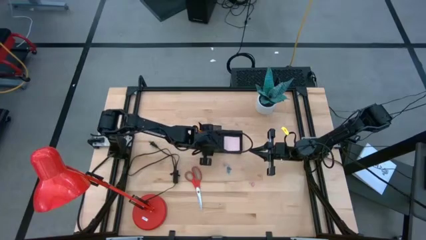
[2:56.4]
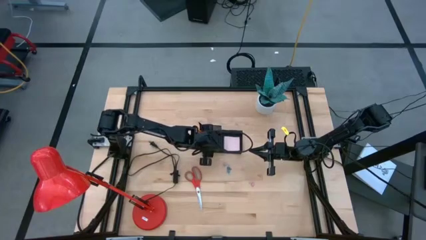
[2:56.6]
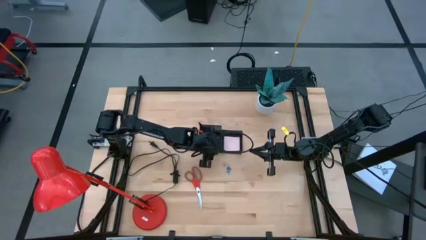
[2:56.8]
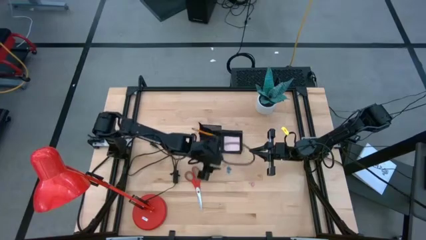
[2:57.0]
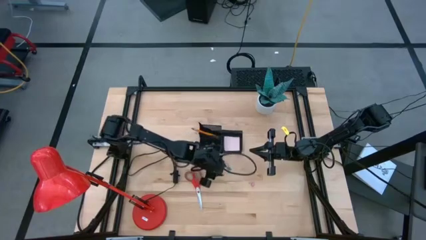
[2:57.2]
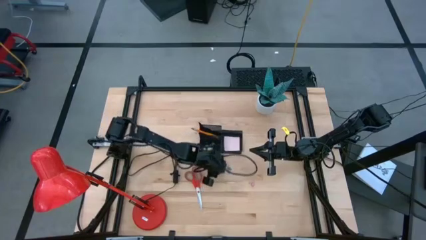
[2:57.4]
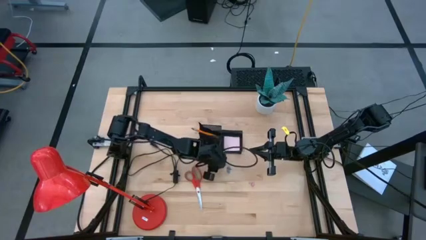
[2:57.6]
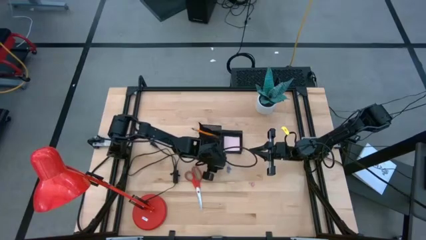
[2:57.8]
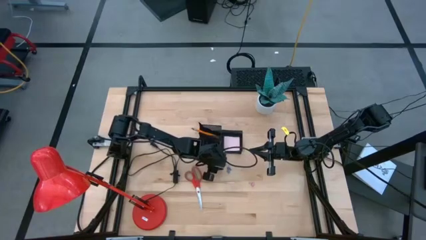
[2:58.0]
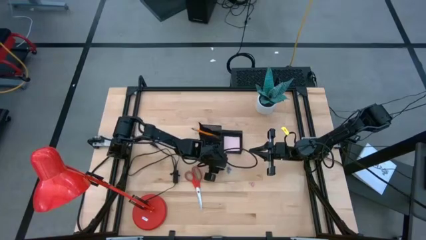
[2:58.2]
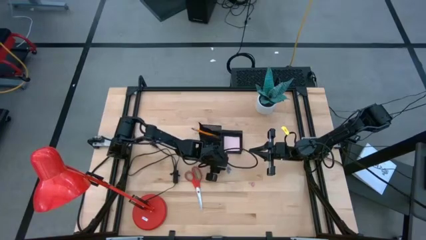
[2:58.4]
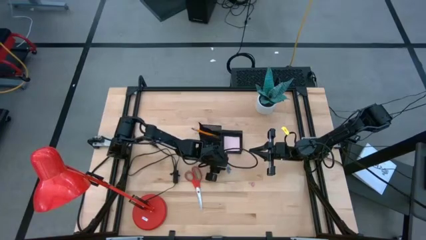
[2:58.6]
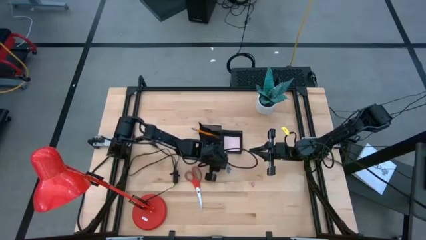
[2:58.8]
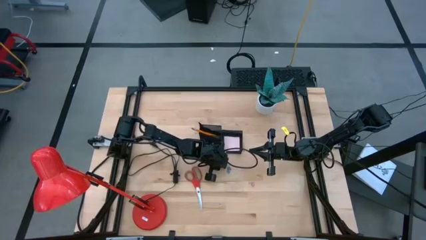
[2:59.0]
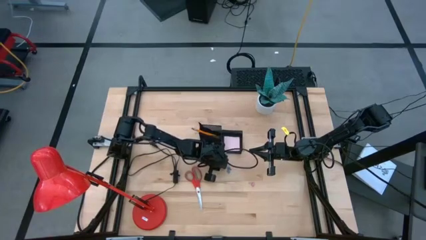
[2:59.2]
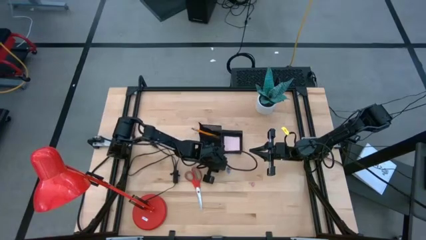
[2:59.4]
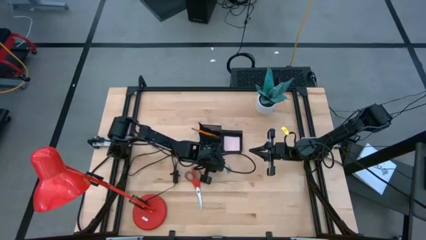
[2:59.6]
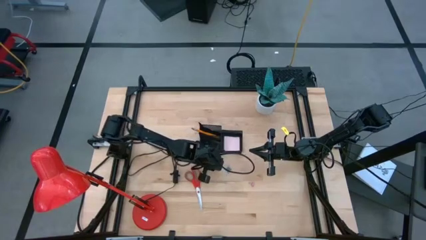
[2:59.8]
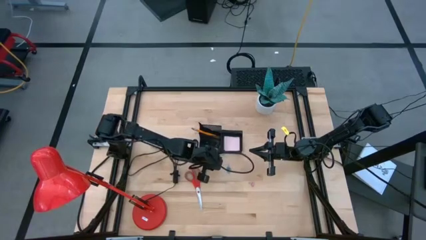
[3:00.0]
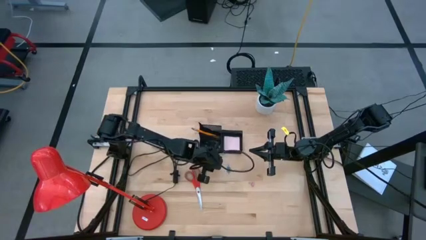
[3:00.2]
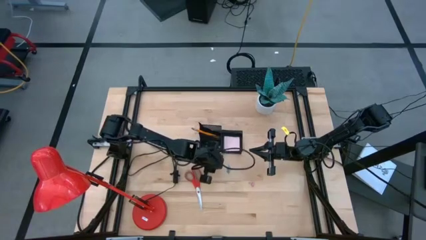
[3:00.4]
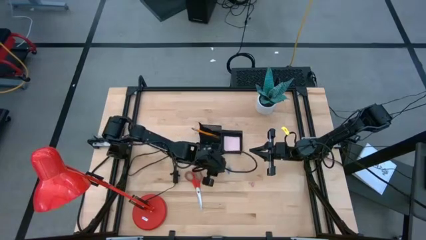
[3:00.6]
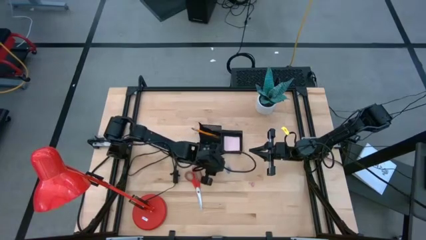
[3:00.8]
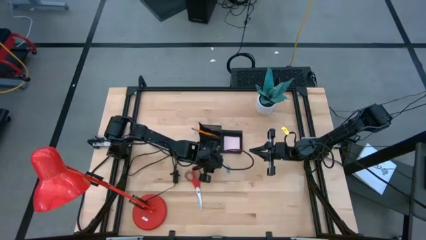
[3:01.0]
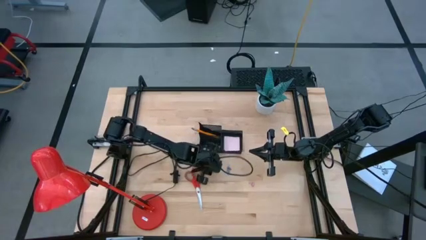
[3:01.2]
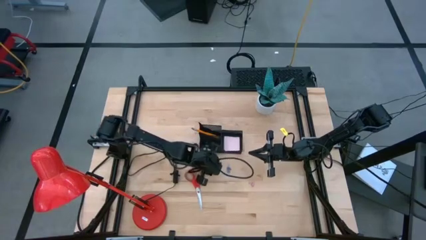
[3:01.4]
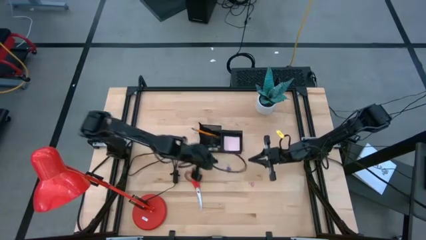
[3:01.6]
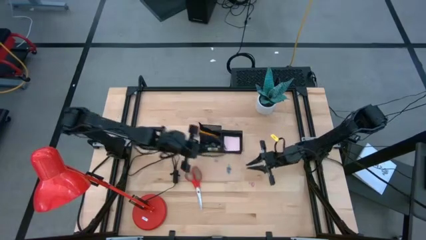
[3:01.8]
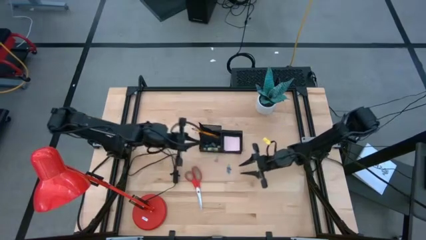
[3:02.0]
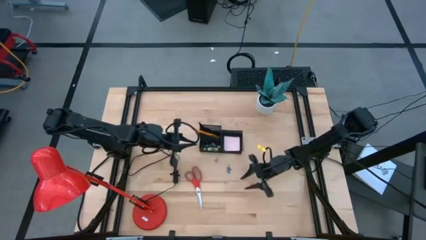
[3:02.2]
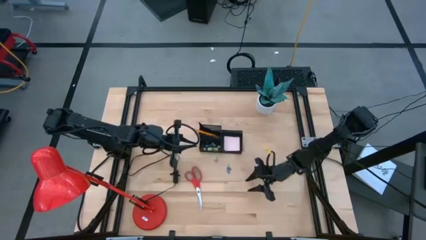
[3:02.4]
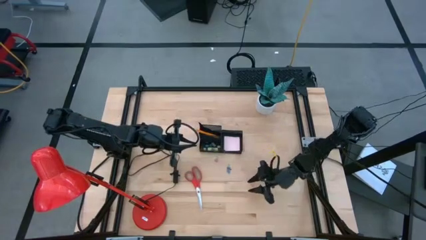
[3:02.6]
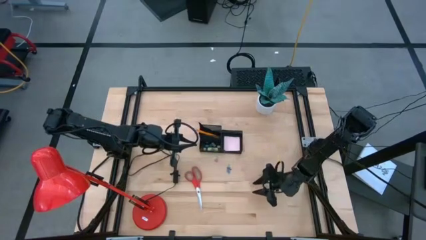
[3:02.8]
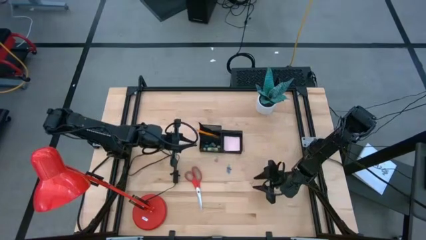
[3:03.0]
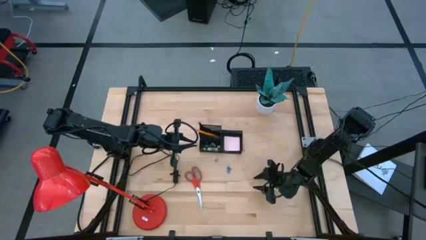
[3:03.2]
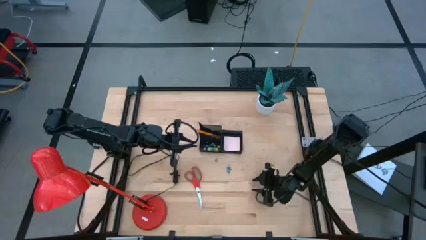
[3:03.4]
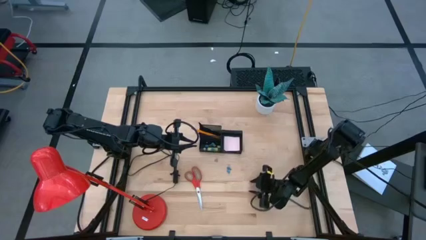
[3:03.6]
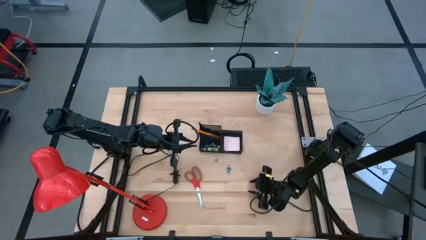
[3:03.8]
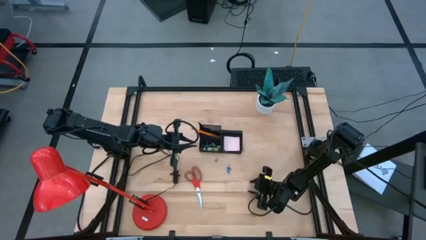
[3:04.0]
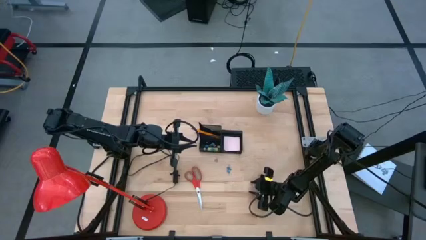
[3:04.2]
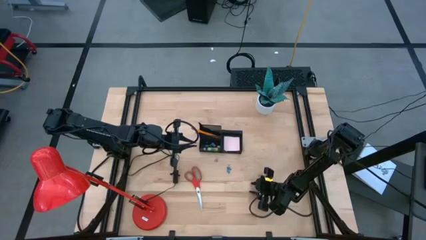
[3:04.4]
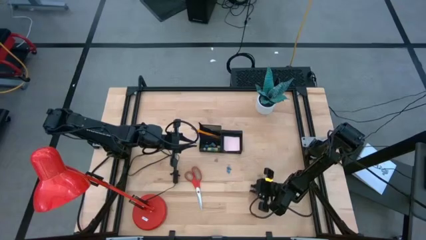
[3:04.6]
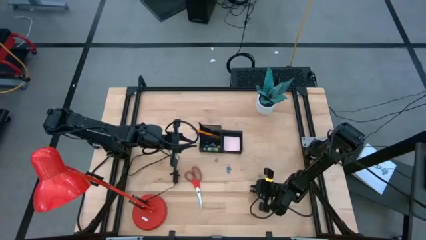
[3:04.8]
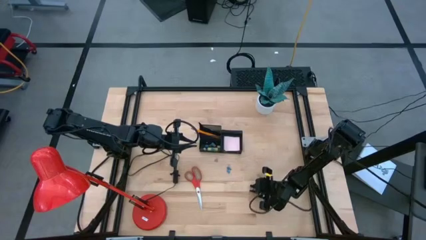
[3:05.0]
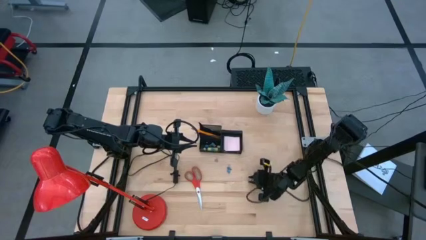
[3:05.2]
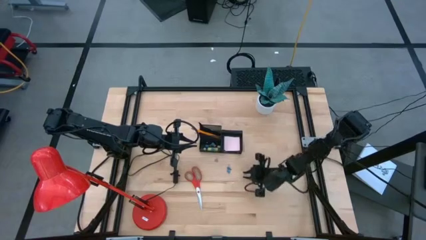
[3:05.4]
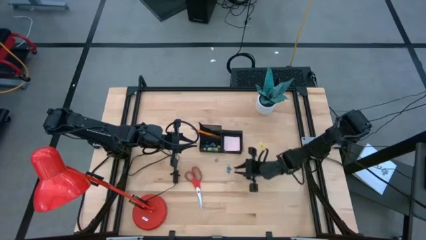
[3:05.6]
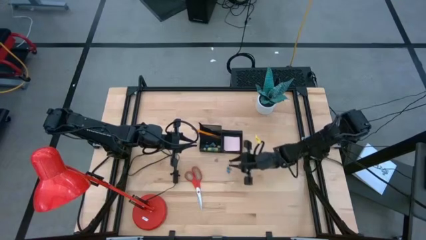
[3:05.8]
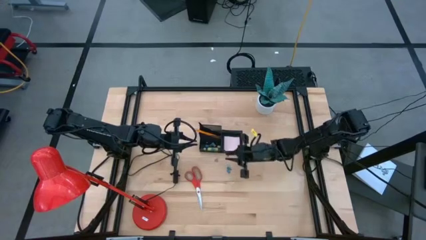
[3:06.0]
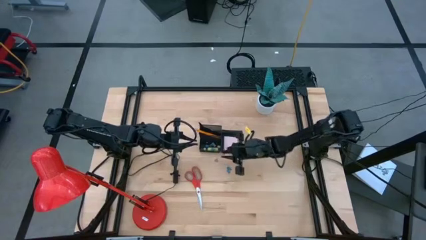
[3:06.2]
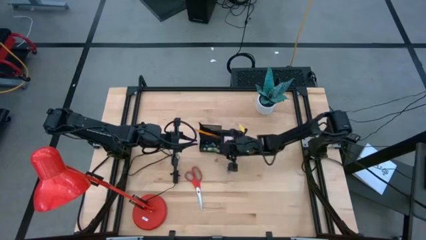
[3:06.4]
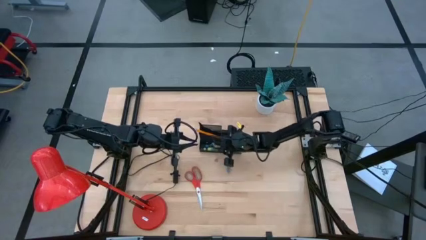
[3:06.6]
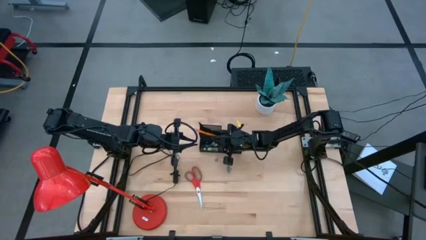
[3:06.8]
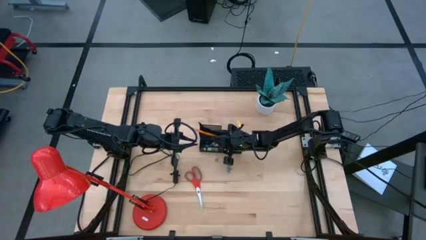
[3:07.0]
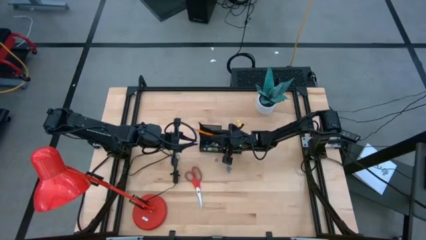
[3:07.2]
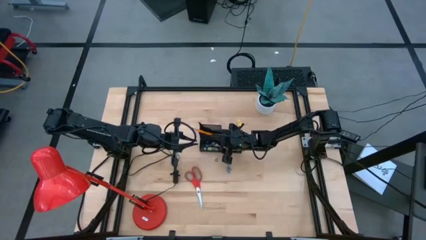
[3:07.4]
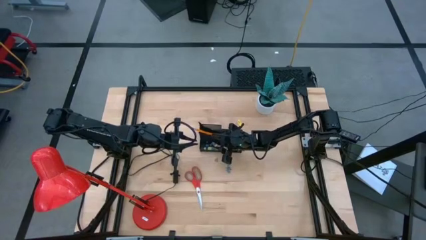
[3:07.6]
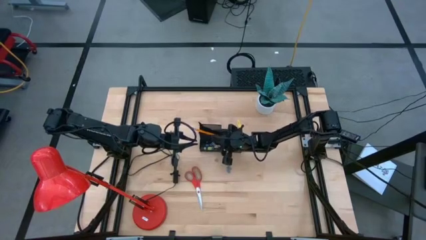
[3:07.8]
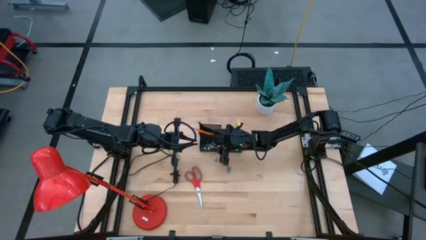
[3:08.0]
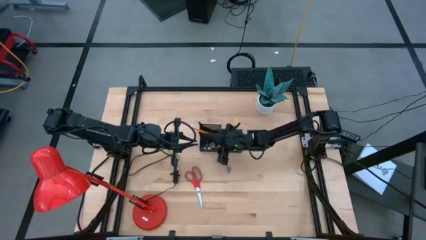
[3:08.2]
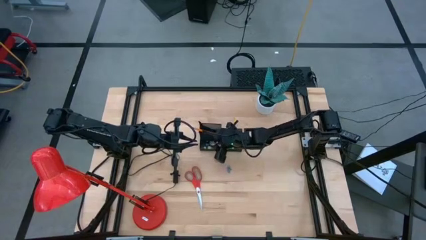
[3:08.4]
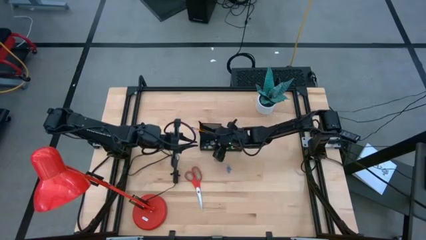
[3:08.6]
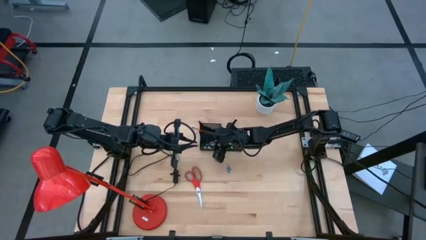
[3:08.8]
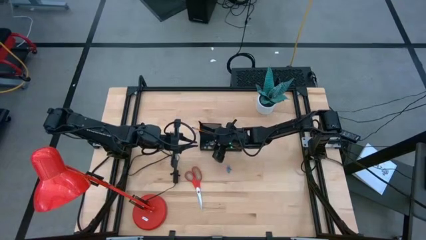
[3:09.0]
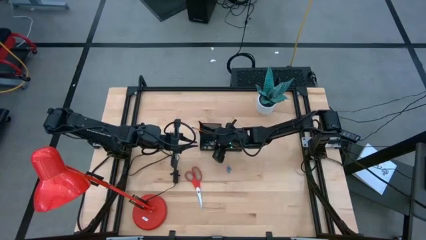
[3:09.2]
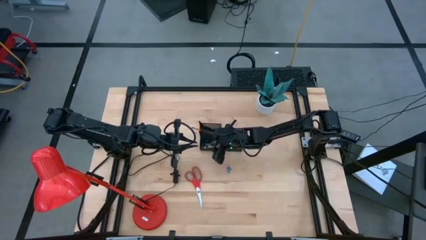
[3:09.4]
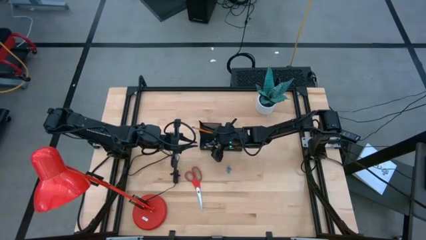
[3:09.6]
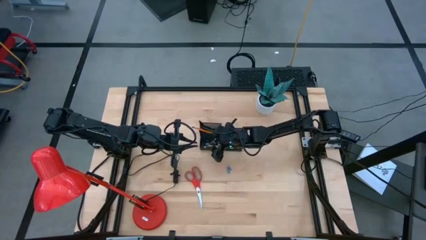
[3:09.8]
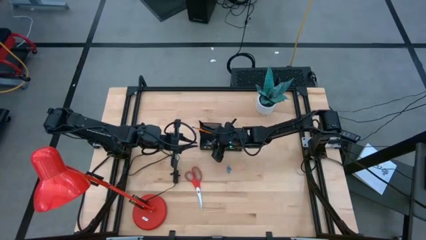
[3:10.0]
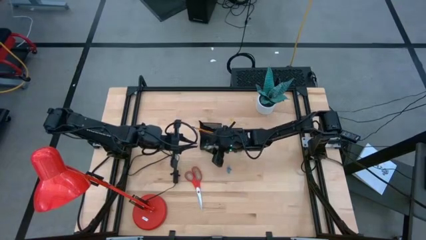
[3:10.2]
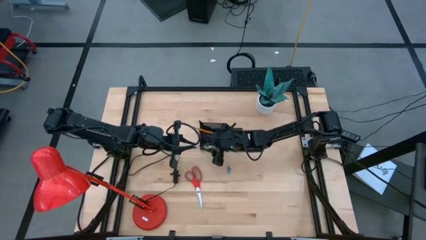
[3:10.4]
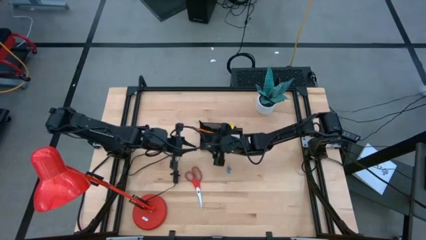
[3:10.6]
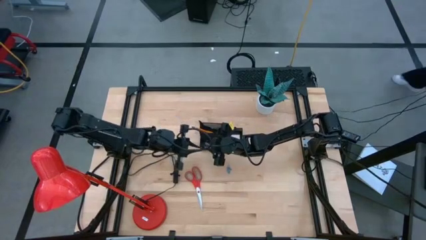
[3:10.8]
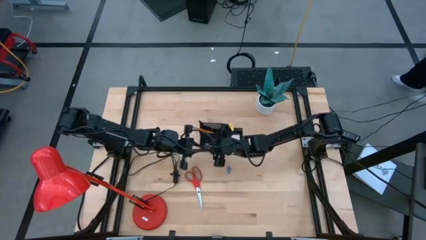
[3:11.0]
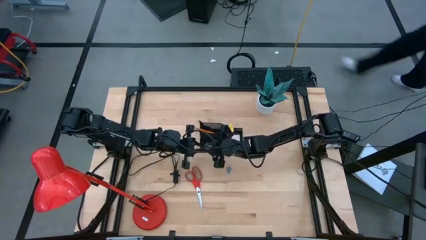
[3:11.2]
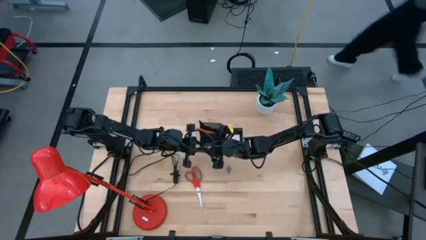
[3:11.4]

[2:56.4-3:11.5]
Task: Pick and place office supplies into organizer
Put the pink binder clip into the black desk organizer

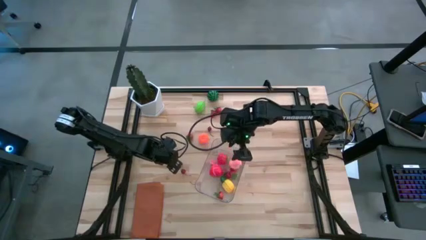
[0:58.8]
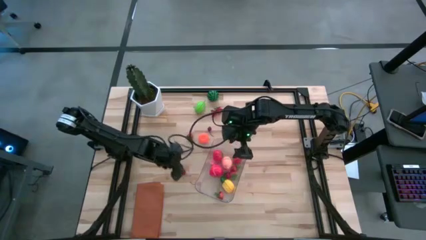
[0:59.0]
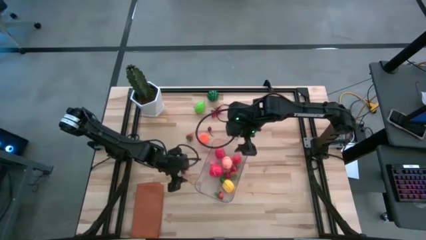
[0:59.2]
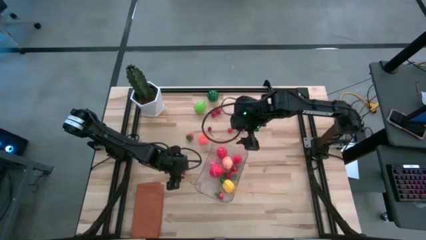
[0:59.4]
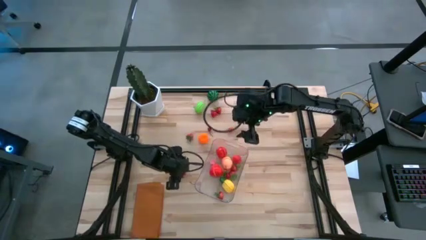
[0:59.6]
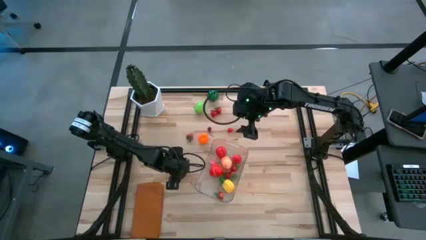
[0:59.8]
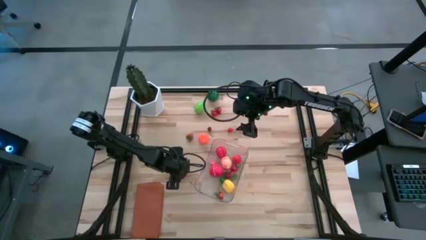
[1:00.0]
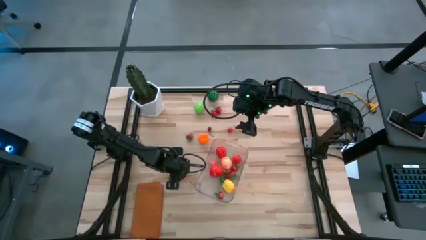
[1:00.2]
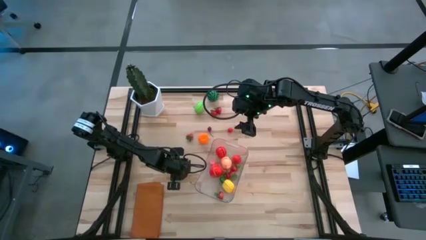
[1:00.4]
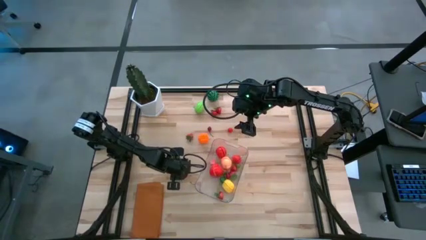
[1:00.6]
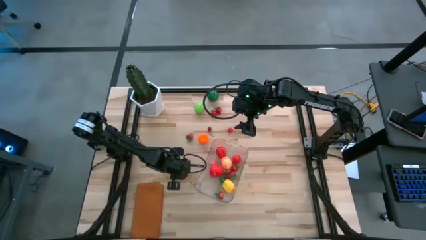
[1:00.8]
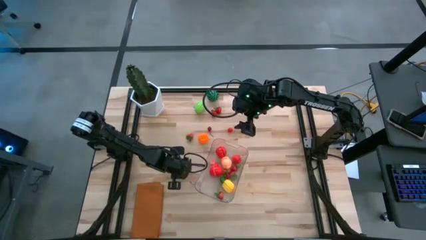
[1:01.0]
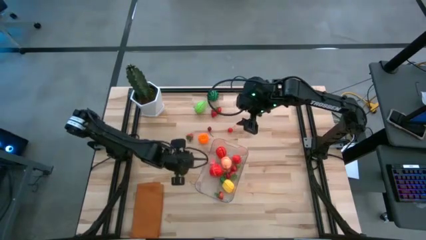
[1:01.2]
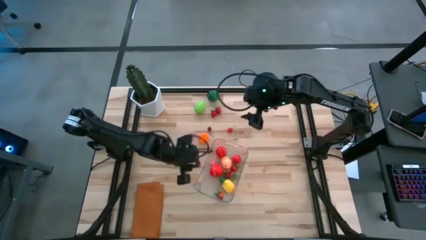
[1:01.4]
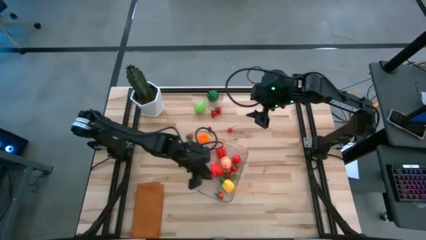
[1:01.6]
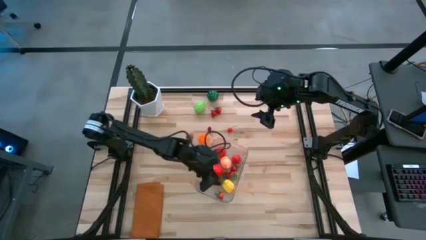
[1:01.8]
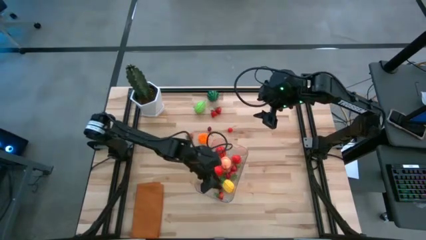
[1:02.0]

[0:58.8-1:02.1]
Task: Pick and placing Produce into tupperware
Put the red cherry into the transparent bin
